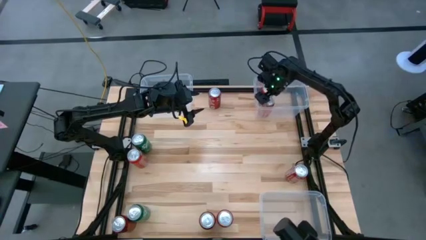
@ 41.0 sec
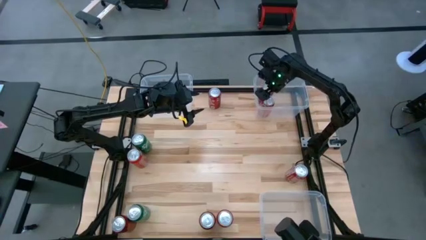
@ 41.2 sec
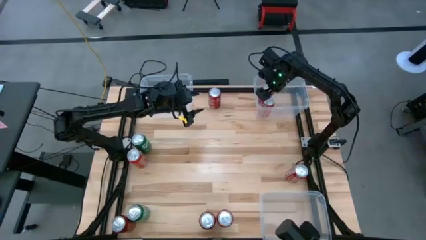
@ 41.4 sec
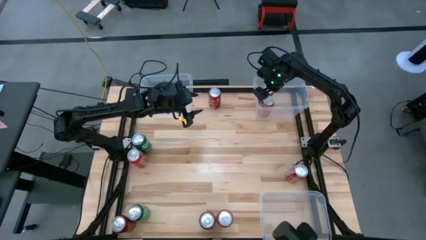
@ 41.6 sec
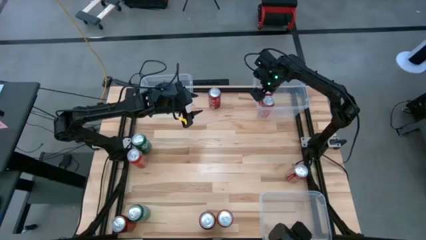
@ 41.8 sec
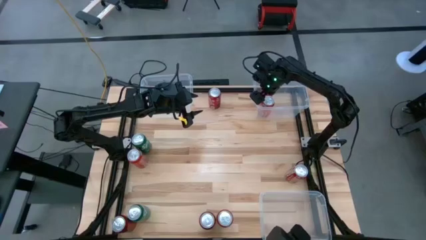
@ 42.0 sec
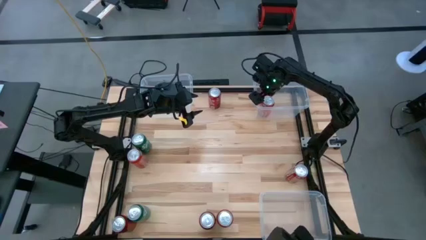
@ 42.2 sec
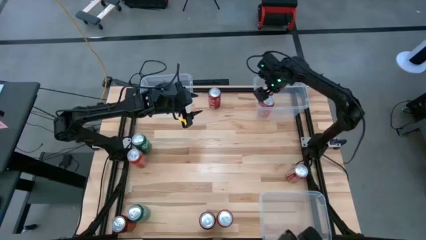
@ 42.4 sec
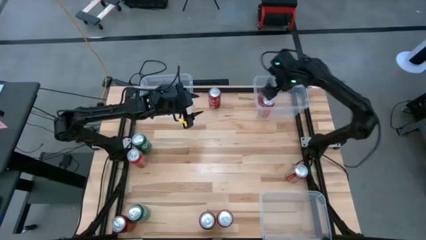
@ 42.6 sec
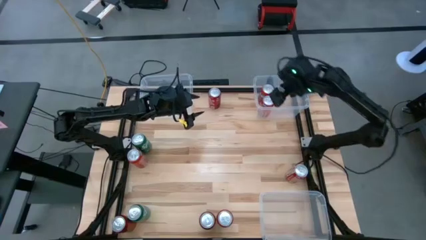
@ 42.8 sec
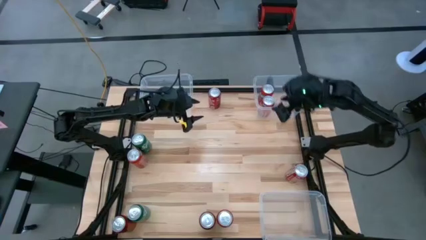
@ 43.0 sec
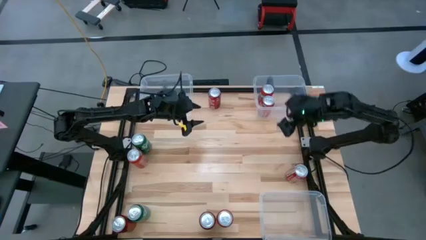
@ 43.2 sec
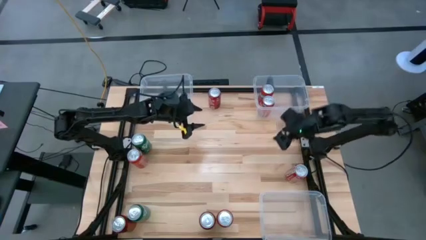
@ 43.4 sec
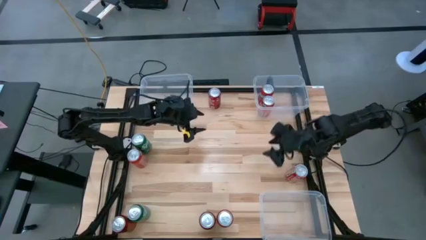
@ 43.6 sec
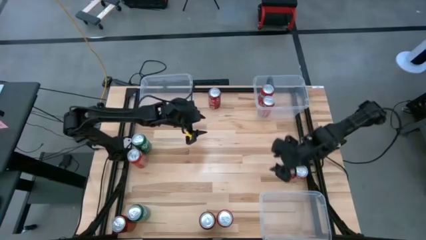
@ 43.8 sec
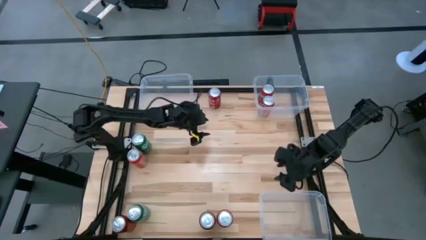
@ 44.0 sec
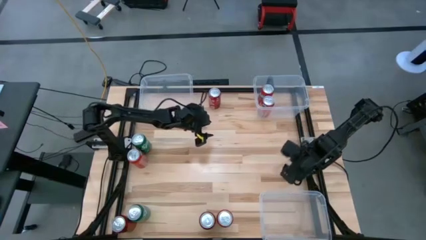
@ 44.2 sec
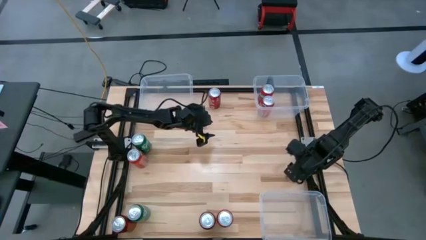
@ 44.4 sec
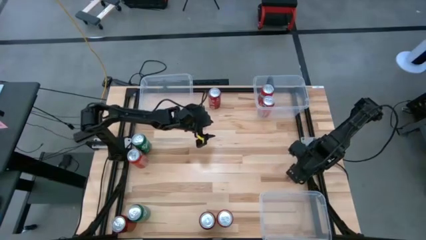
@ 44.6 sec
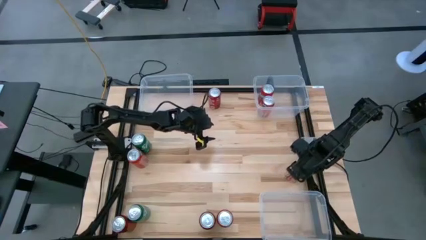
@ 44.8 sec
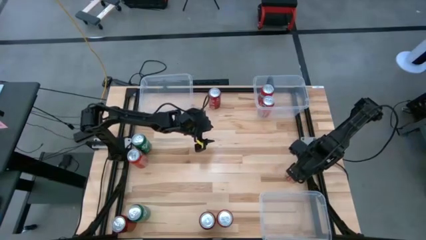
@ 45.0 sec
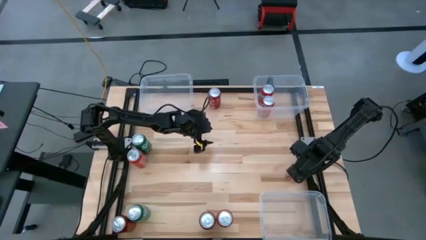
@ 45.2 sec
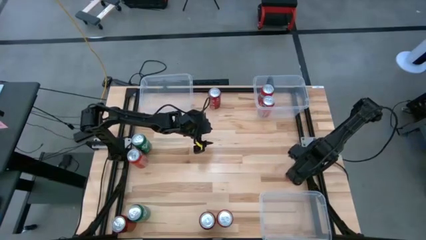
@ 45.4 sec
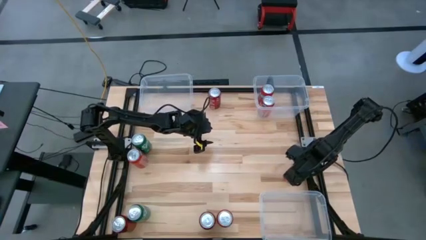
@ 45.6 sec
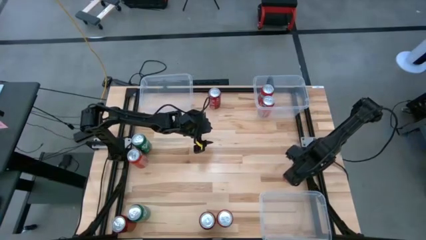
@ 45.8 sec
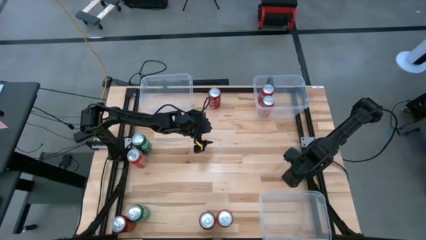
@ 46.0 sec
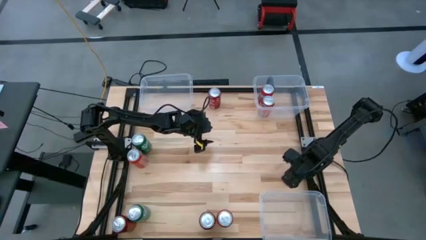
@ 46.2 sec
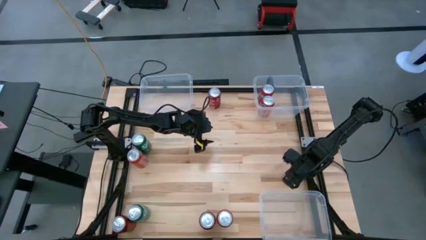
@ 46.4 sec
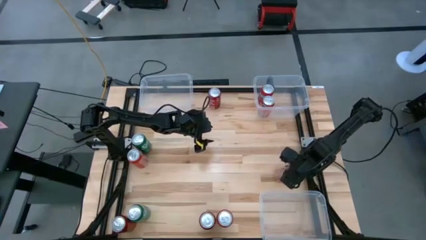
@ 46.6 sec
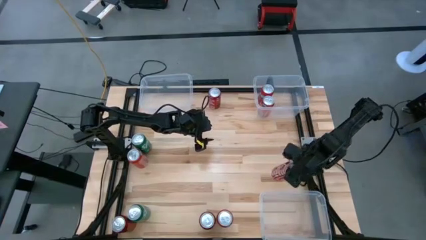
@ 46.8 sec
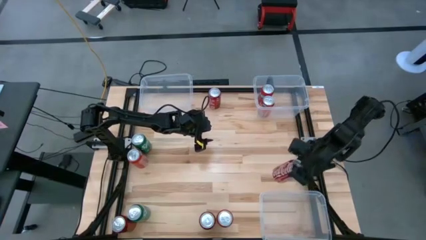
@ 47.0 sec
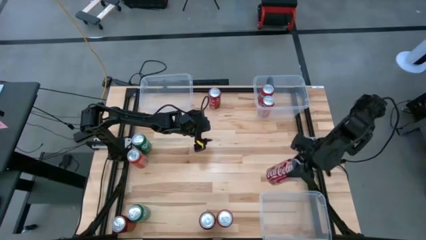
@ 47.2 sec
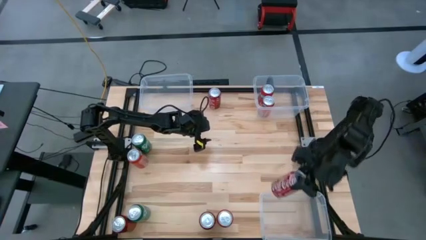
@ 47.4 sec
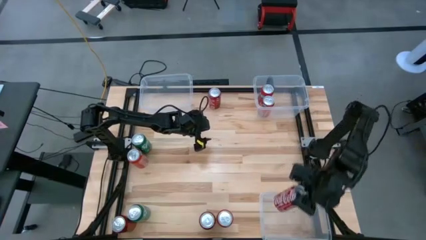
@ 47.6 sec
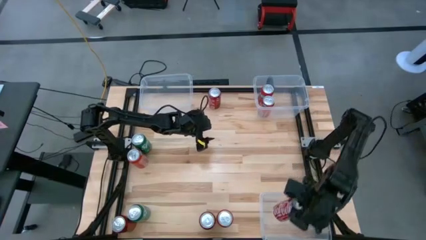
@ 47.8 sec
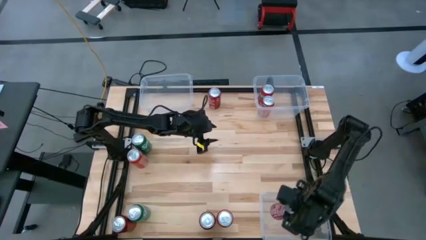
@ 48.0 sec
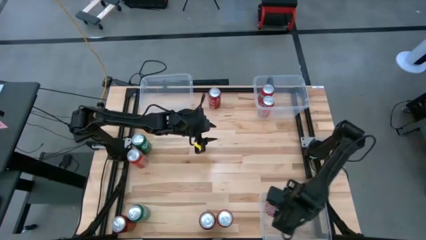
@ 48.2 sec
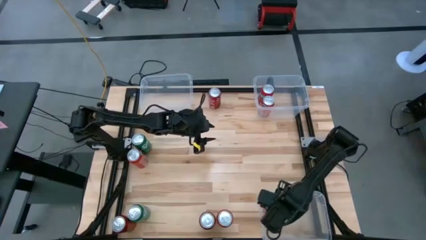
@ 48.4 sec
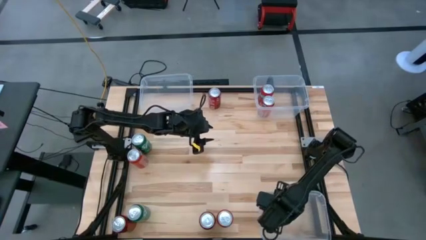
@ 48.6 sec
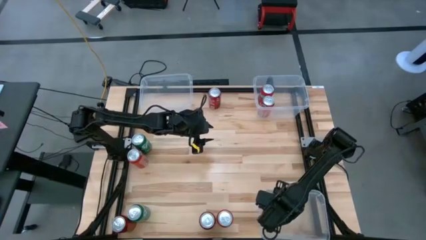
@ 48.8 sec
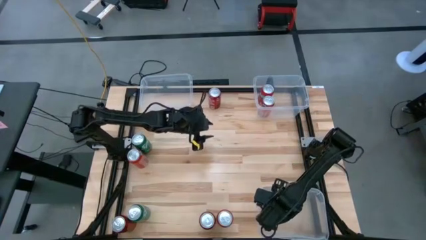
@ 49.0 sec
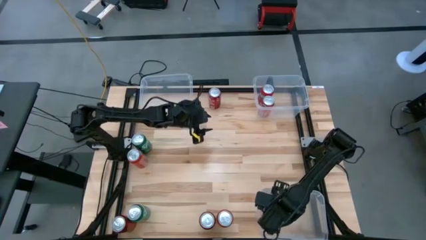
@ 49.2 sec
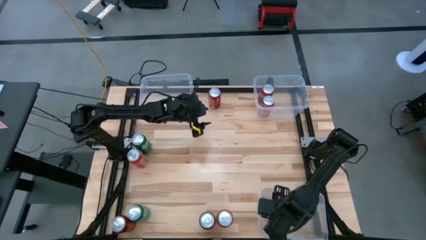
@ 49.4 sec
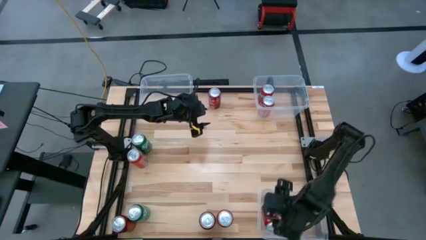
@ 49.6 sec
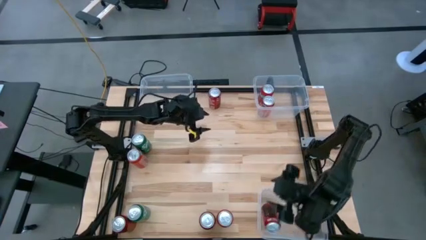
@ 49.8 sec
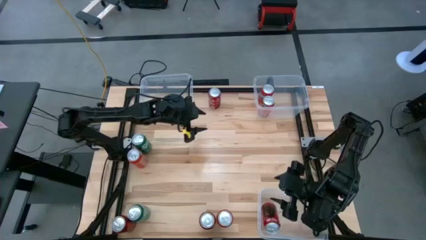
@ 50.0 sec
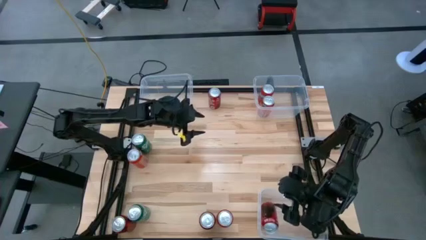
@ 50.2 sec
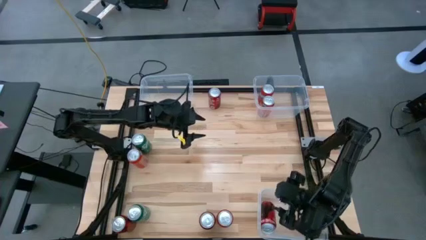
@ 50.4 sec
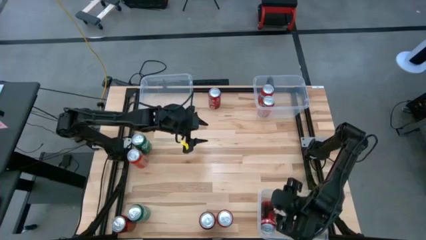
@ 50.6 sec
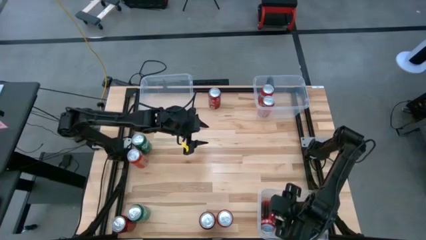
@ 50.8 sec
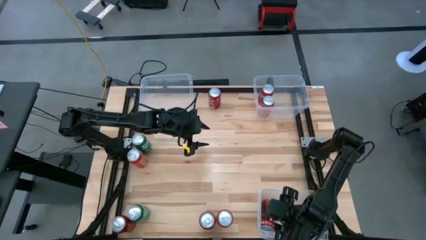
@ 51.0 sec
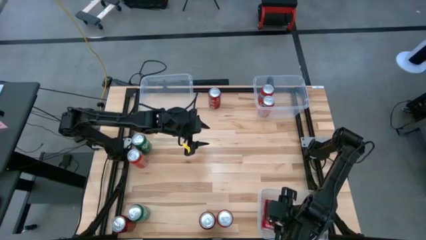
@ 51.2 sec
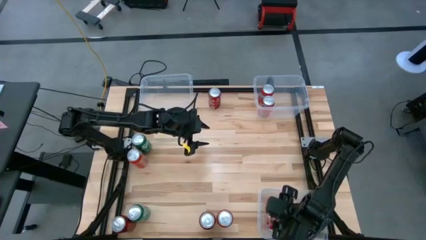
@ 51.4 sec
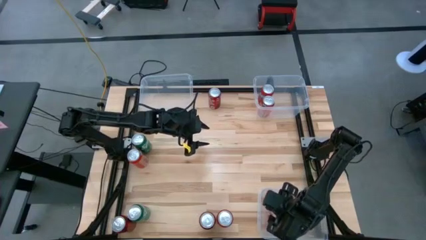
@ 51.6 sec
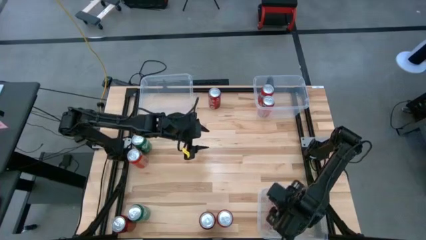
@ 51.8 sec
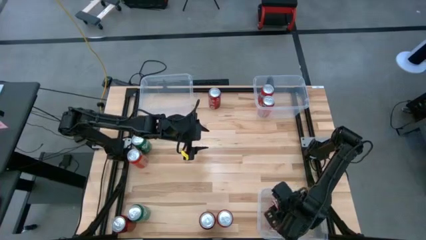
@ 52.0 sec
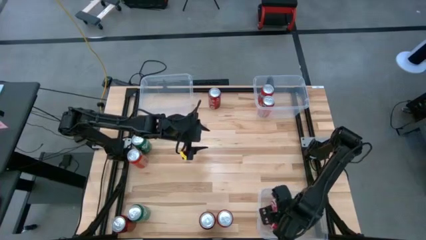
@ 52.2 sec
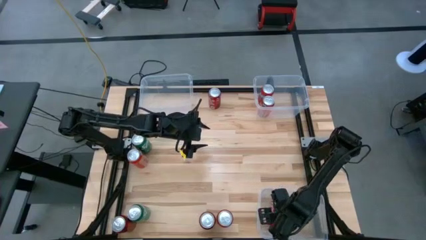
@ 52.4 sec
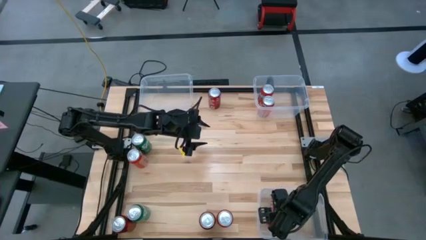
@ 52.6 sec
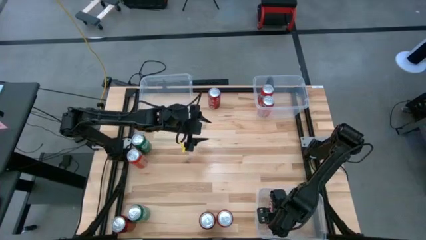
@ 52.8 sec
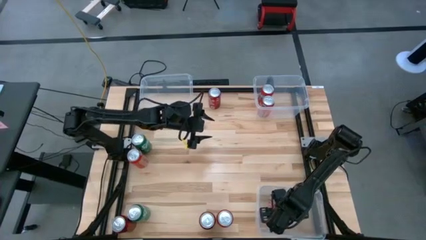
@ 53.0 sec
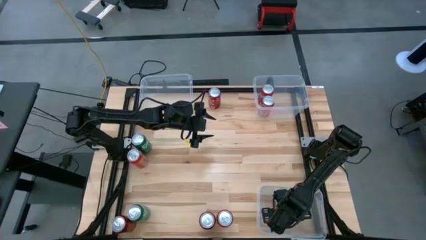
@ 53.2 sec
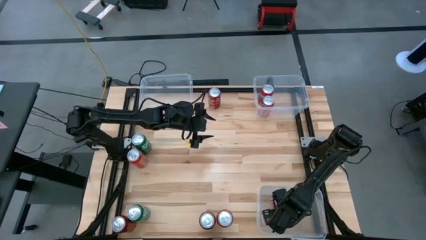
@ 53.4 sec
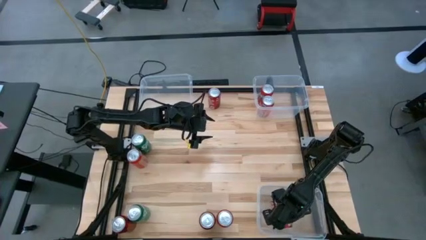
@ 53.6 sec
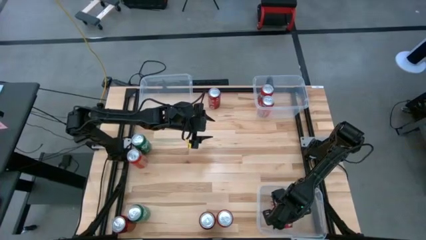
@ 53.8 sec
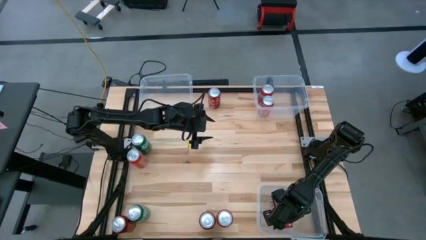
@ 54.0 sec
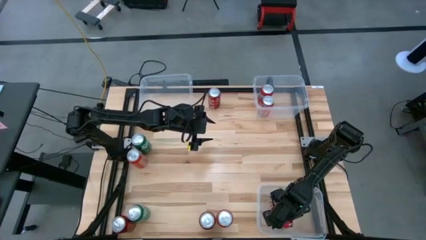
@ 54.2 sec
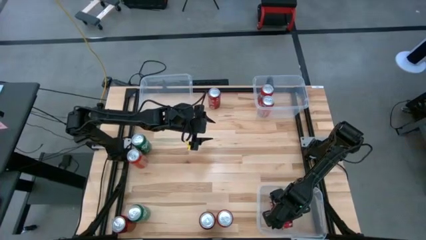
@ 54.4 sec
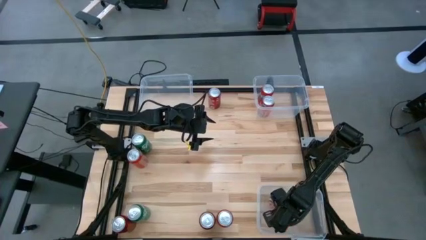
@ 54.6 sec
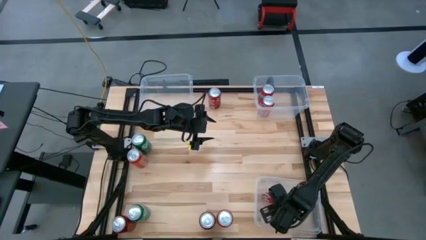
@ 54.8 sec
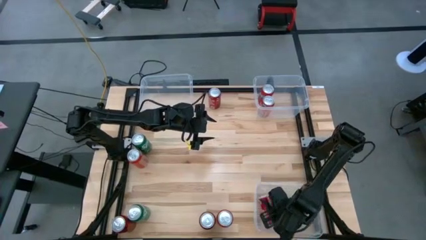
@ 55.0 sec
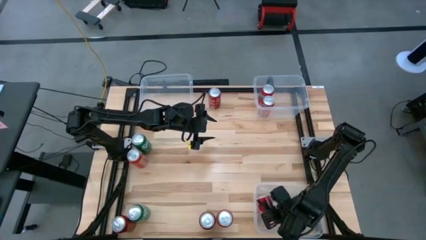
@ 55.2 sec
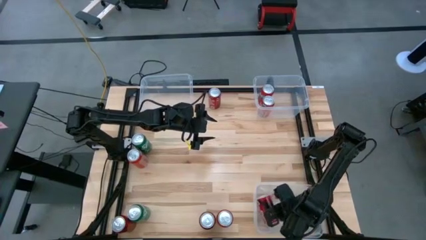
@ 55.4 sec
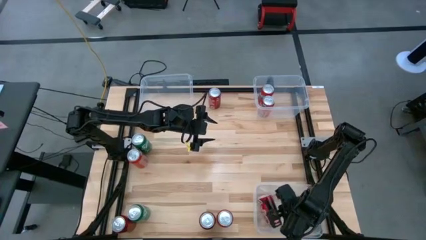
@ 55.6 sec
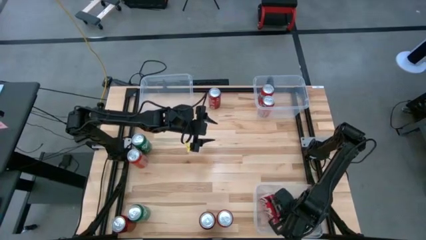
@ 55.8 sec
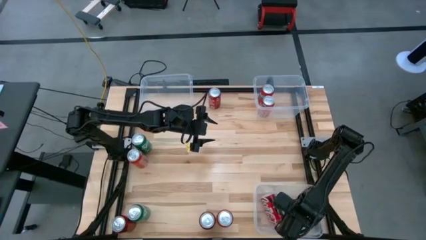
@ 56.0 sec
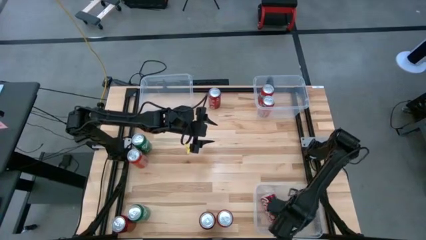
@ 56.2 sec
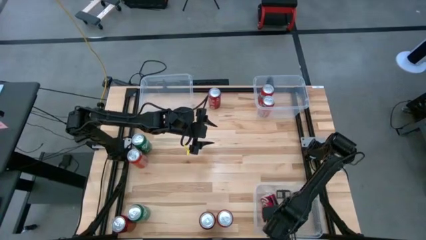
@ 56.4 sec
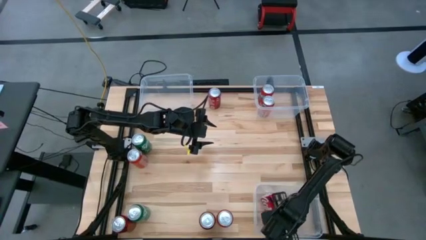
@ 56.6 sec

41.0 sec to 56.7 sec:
Task: Sort soda cans
Put the middle right red-white soda can into the bottom transparent bin
